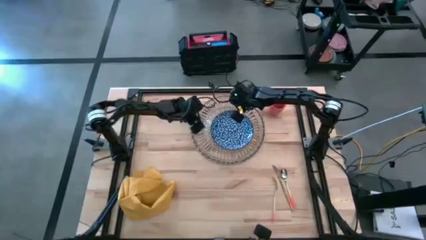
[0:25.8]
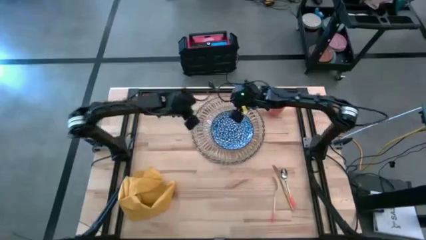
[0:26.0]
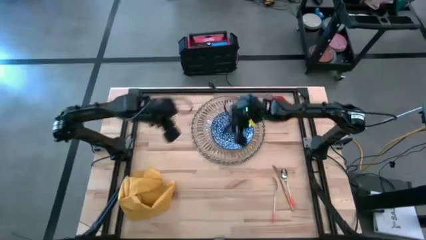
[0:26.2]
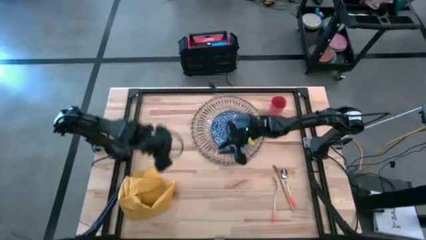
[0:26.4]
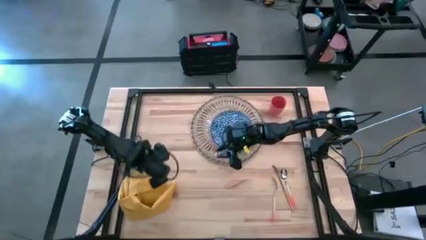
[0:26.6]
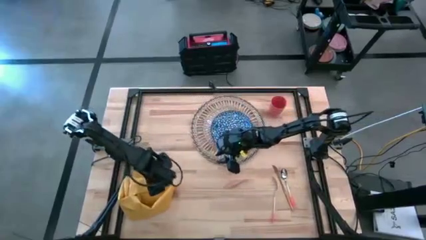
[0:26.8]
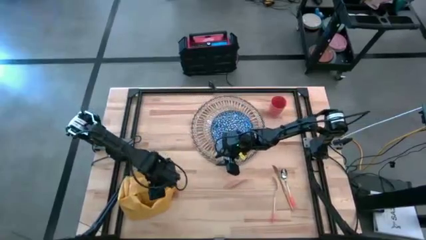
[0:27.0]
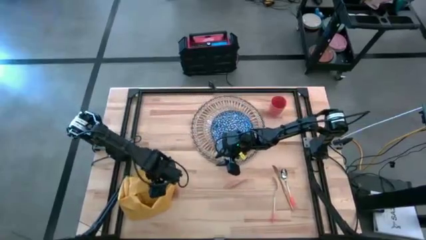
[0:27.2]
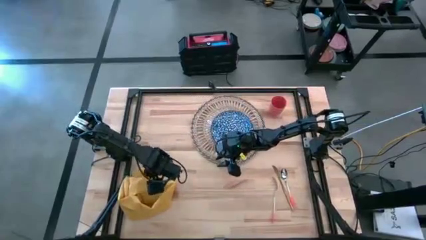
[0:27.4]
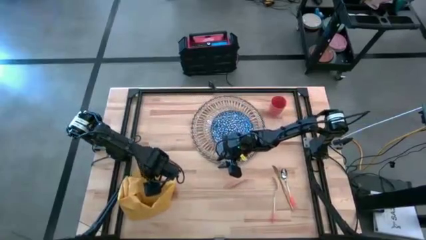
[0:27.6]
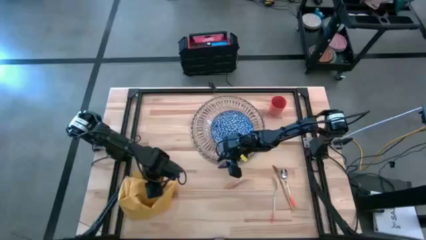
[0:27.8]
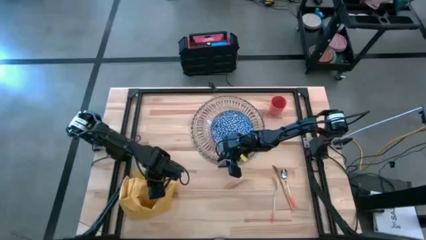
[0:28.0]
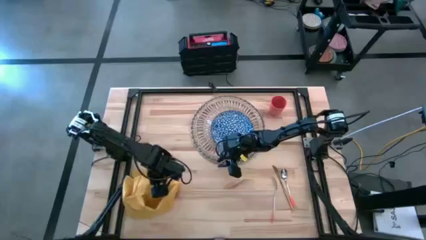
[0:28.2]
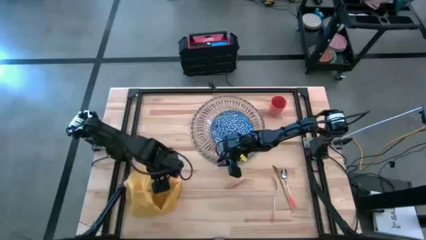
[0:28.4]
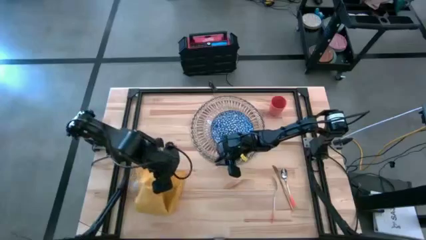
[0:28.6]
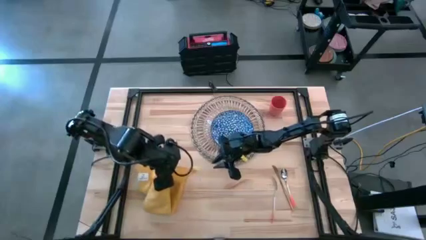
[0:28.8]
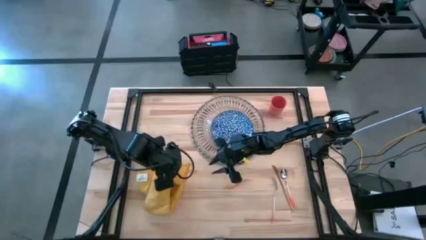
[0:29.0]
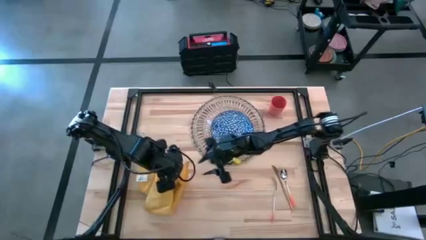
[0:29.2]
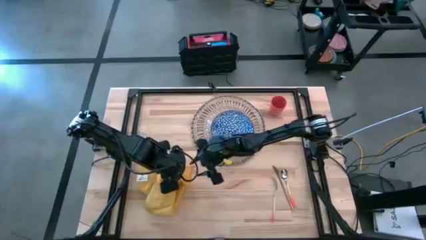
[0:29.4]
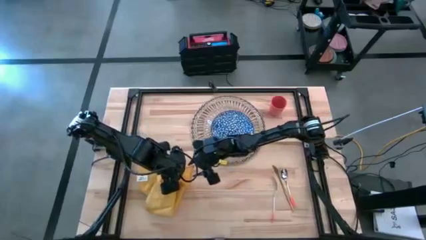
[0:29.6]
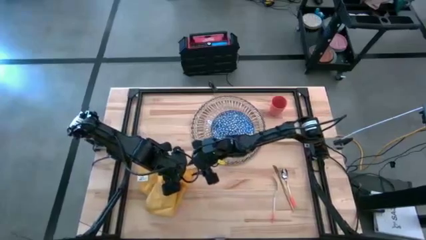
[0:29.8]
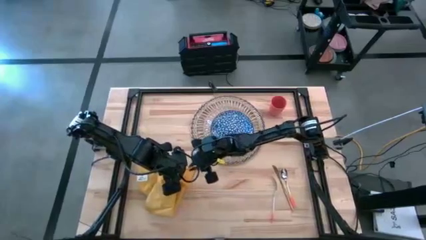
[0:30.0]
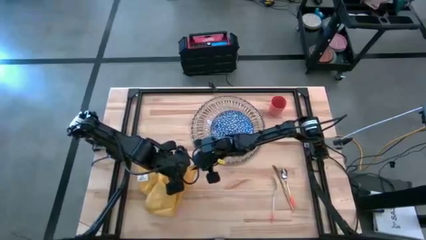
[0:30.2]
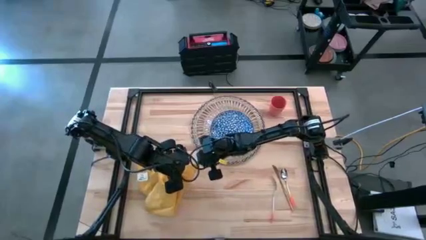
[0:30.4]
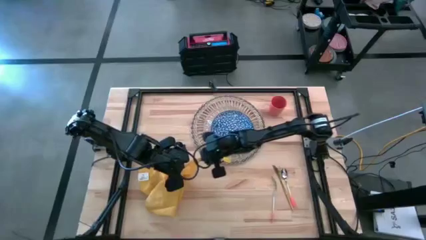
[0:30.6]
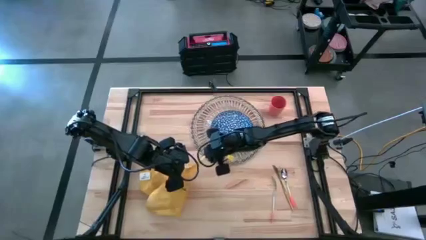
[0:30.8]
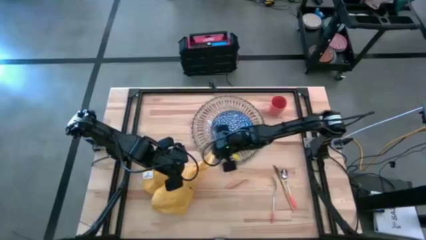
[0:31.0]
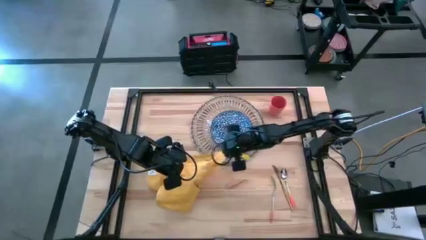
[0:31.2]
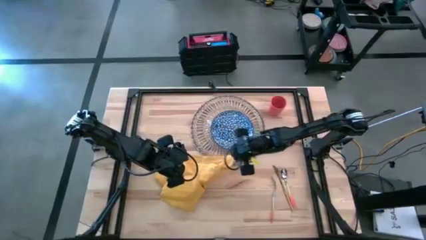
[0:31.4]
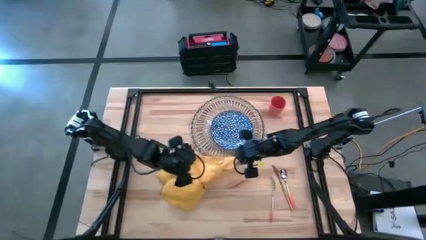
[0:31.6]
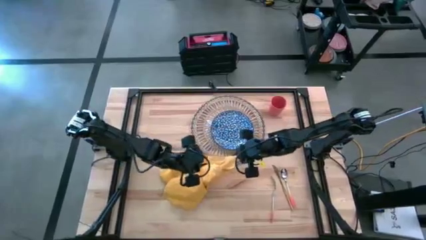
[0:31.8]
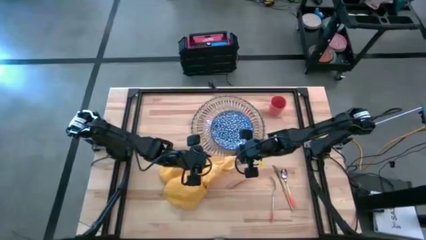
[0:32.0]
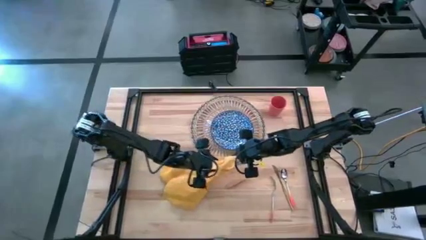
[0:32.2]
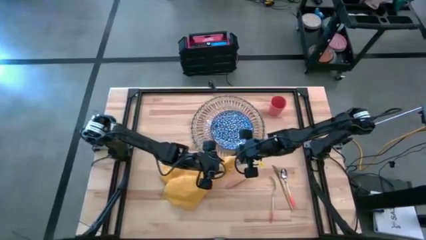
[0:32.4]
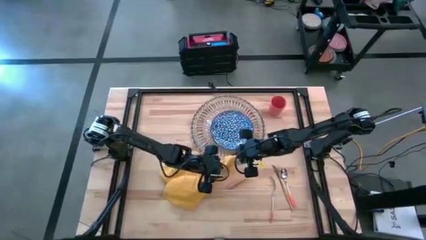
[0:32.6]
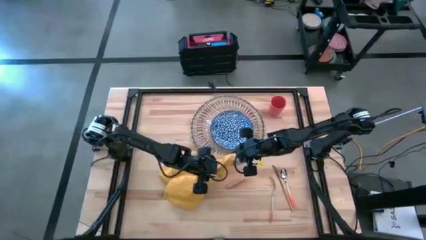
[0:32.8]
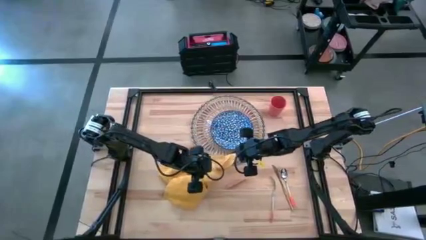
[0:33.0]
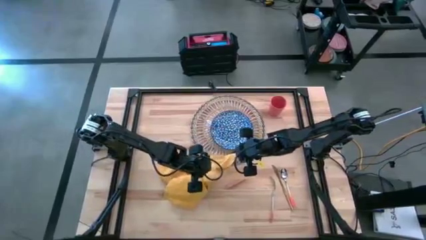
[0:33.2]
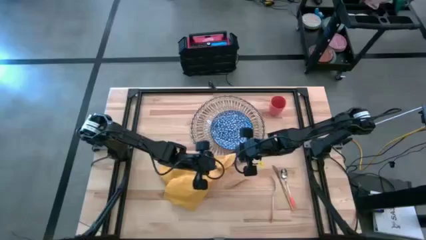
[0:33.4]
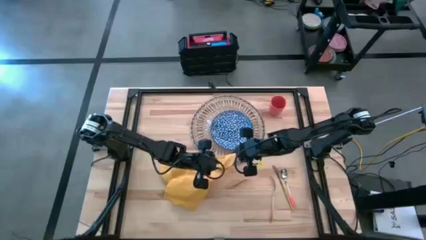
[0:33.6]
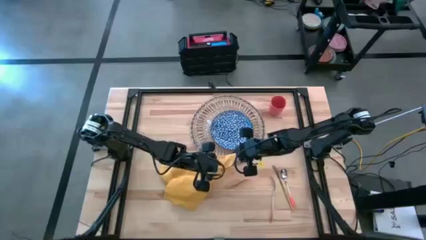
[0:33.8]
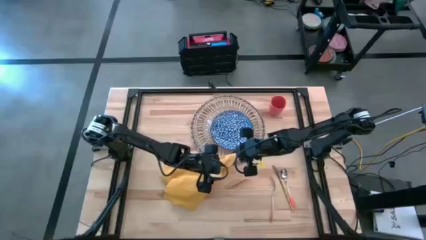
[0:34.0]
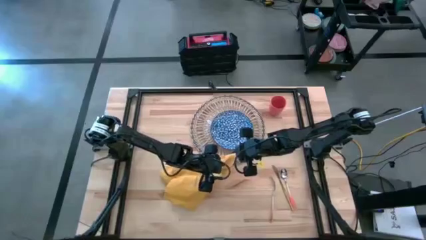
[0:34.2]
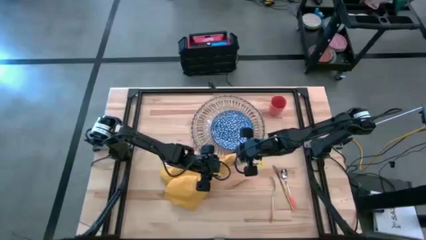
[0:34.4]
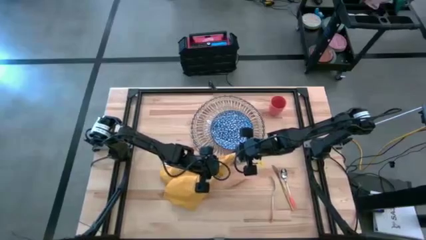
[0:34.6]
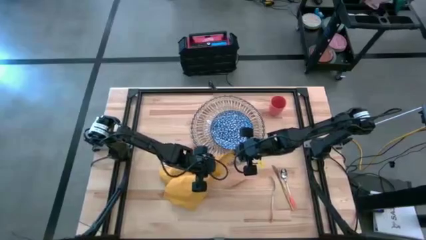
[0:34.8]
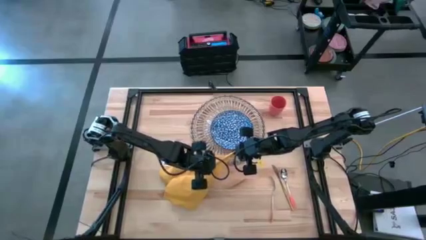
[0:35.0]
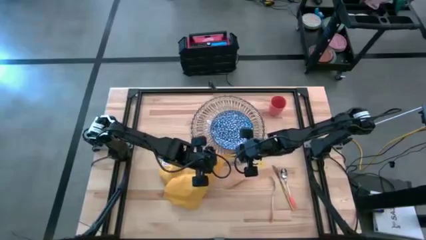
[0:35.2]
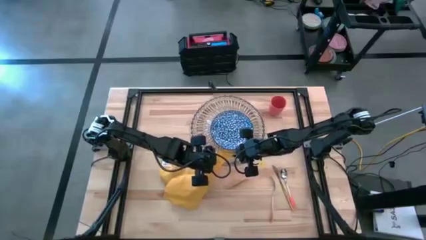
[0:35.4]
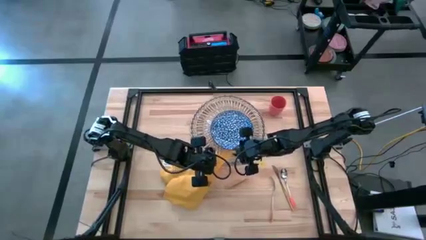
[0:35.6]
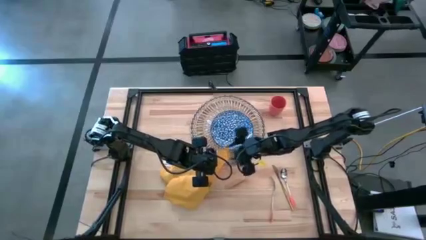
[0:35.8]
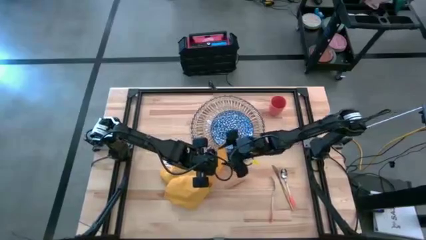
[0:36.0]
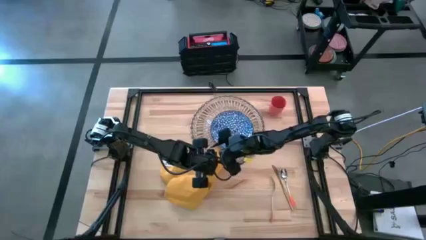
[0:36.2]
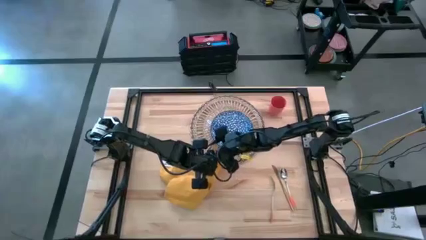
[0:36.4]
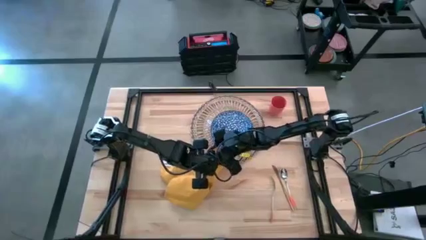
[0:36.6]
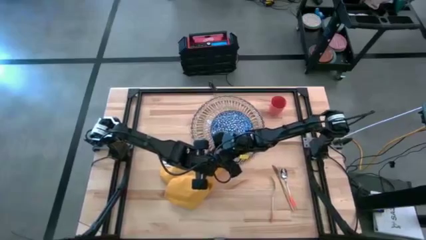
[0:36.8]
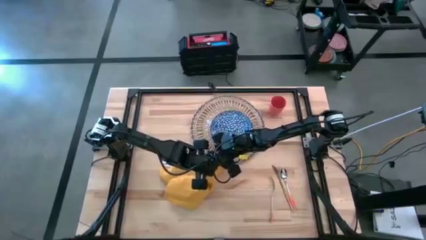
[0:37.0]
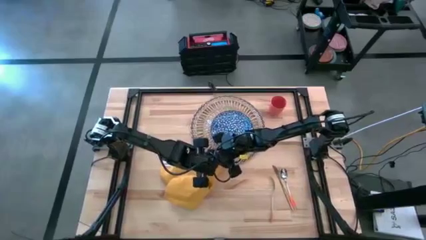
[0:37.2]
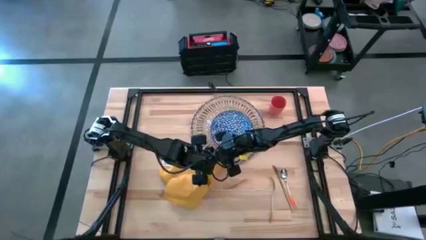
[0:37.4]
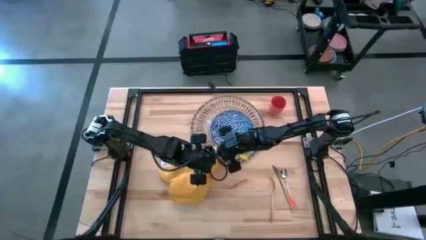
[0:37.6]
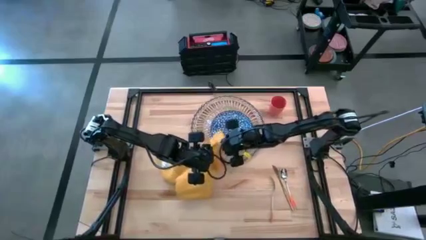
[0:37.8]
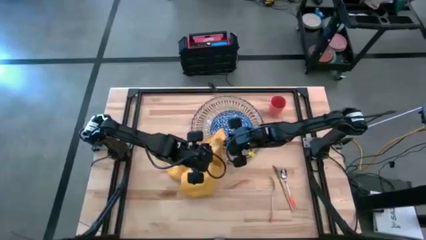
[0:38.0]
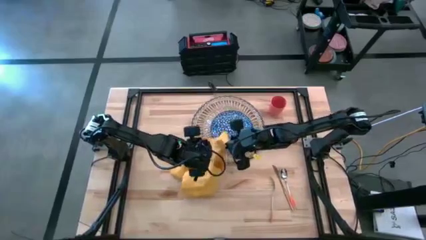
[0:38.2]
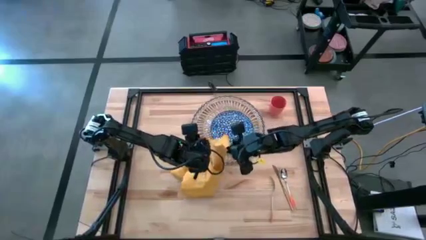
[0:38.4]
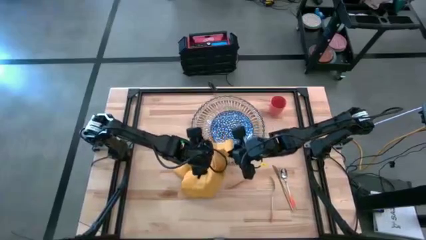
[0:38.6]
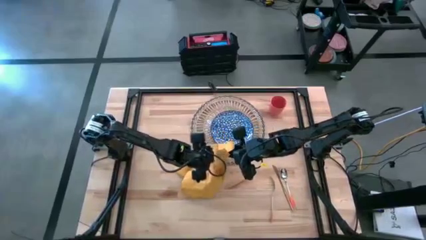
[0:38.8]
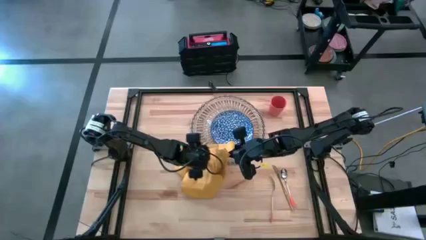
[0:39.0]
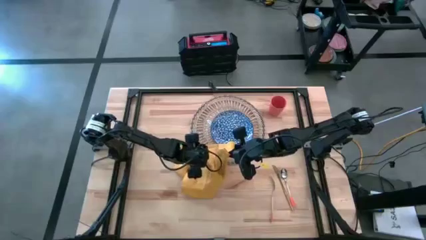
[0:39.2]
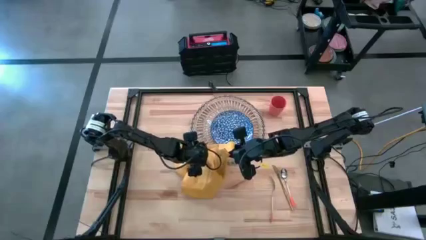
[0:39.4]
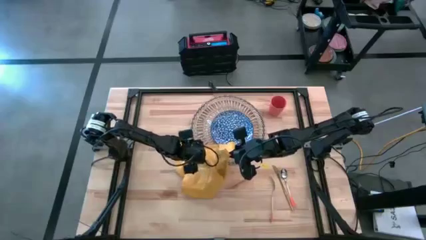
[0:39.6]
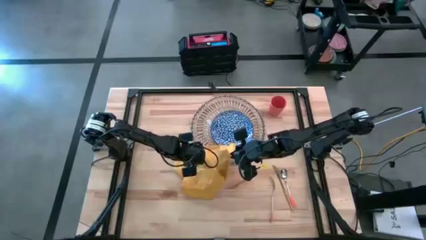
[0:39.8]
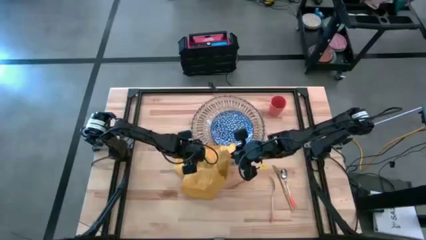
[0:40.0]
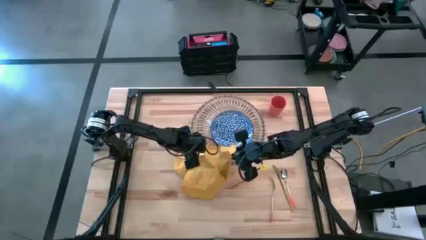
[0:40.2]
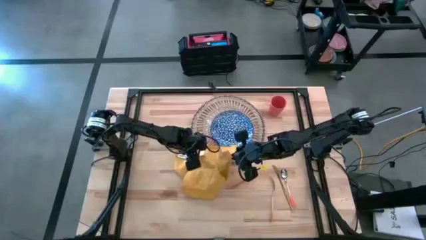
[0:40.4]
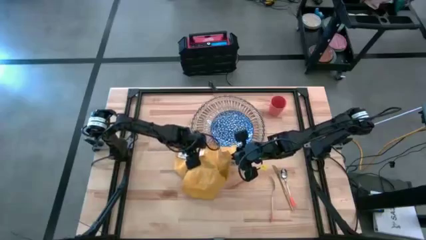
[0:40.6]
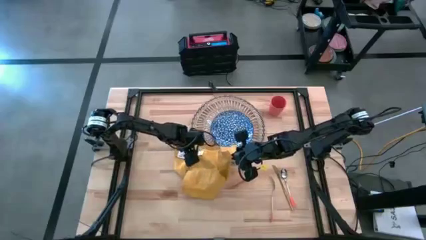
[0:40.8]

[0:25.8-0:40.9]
Task: Set table place
Fold the yellow table napkin
